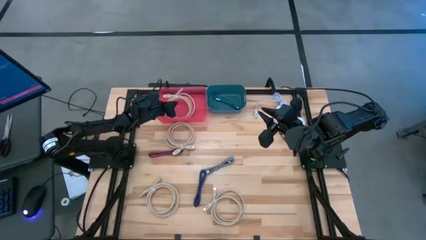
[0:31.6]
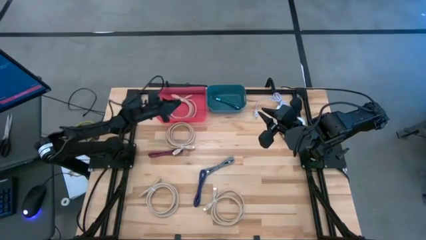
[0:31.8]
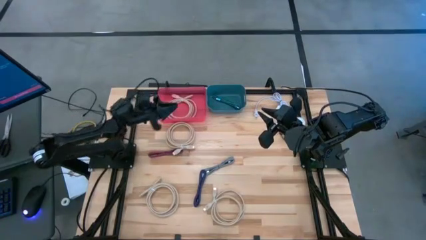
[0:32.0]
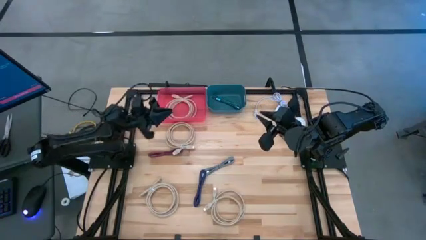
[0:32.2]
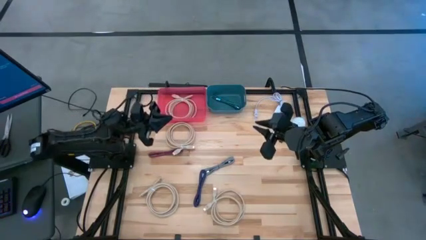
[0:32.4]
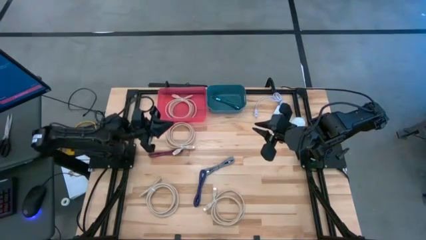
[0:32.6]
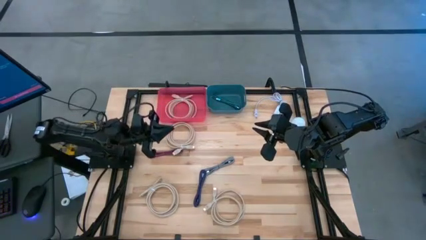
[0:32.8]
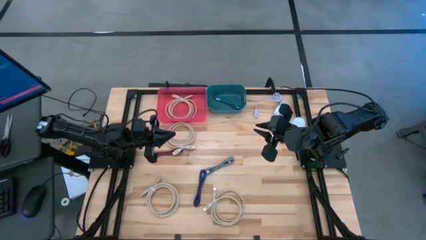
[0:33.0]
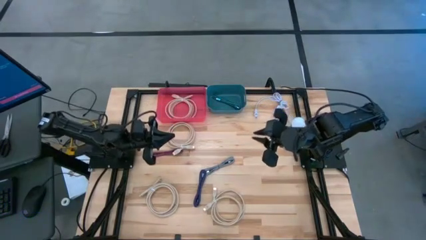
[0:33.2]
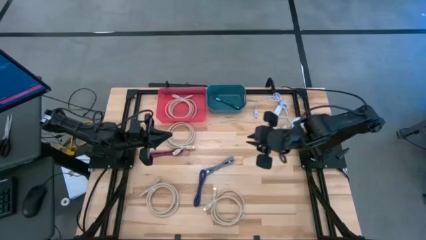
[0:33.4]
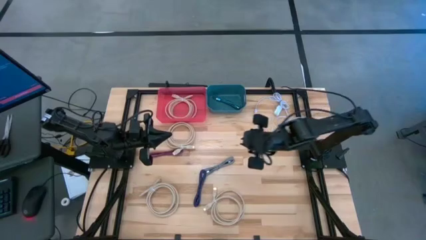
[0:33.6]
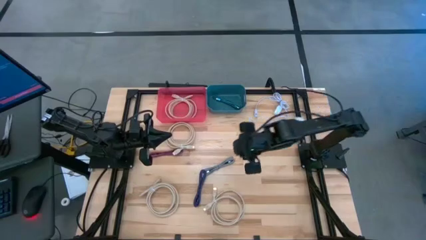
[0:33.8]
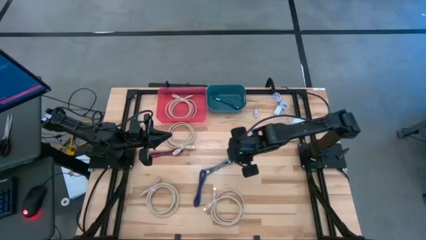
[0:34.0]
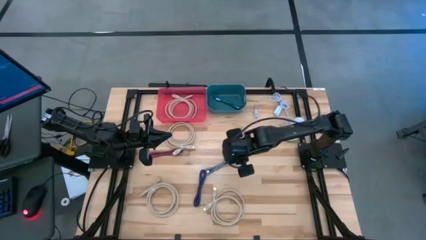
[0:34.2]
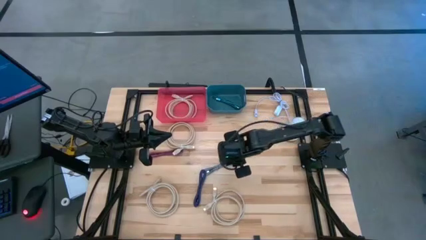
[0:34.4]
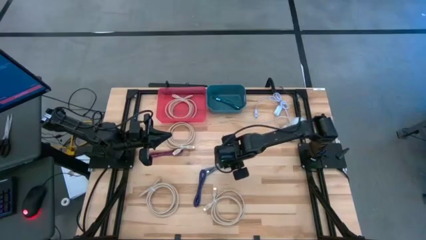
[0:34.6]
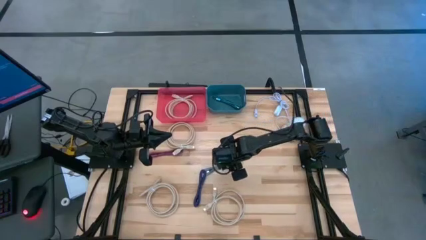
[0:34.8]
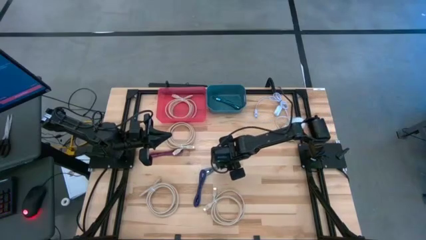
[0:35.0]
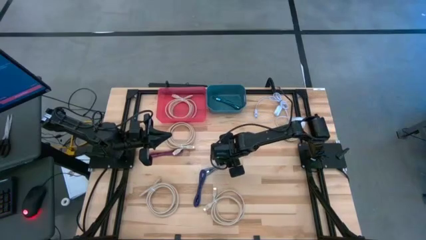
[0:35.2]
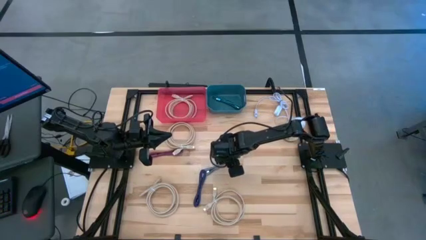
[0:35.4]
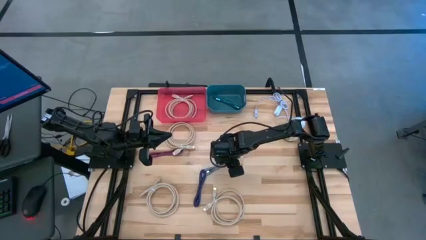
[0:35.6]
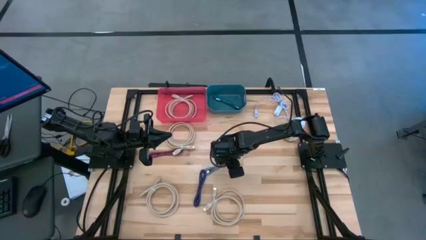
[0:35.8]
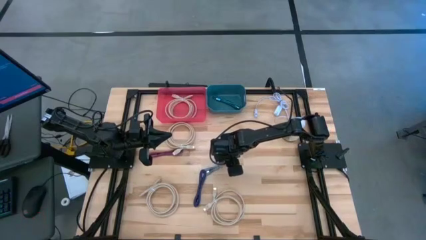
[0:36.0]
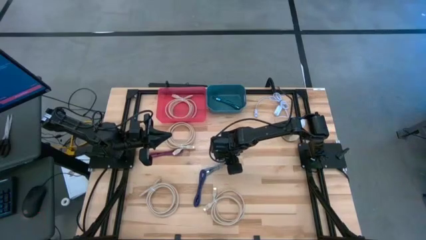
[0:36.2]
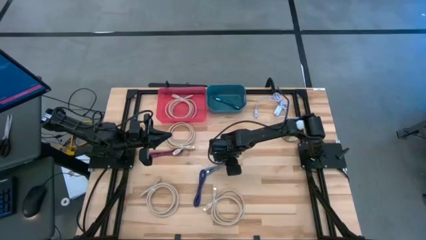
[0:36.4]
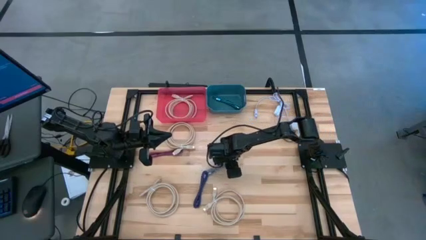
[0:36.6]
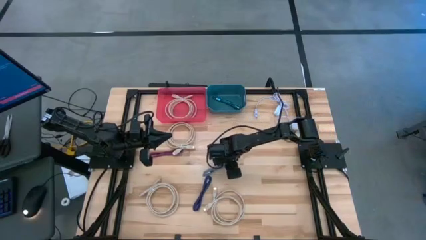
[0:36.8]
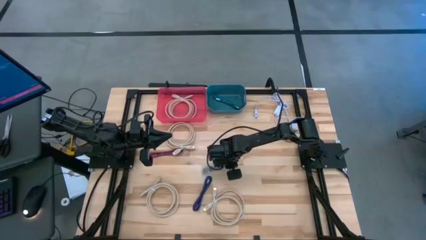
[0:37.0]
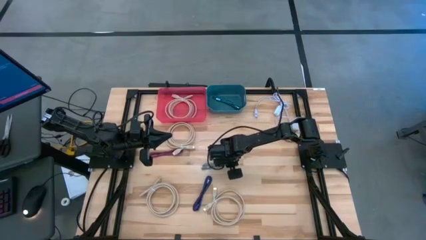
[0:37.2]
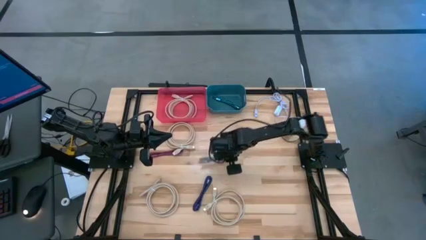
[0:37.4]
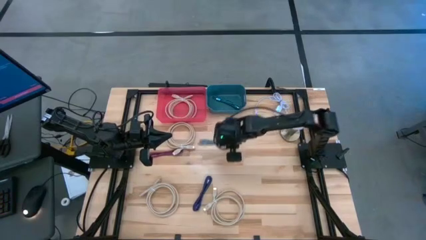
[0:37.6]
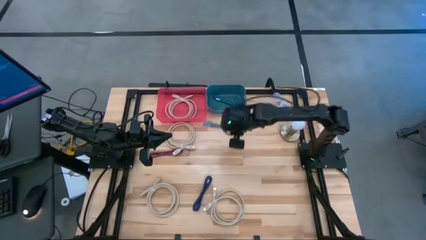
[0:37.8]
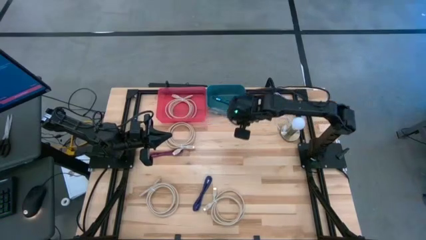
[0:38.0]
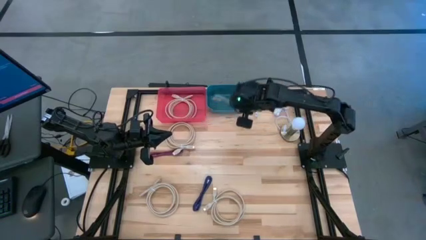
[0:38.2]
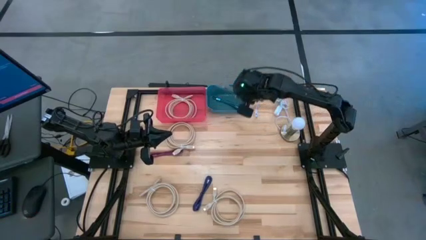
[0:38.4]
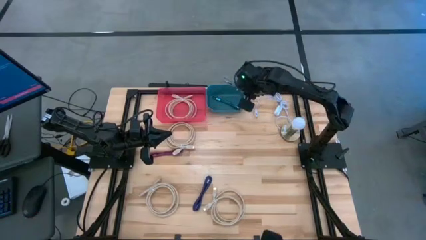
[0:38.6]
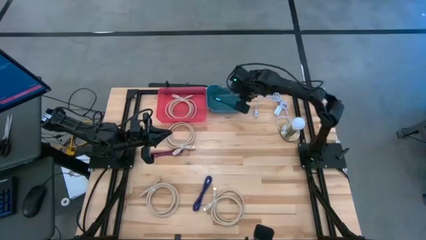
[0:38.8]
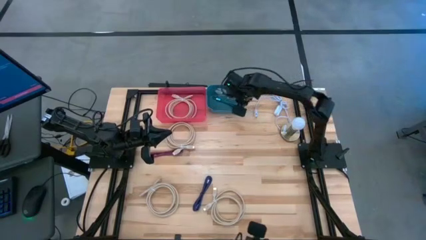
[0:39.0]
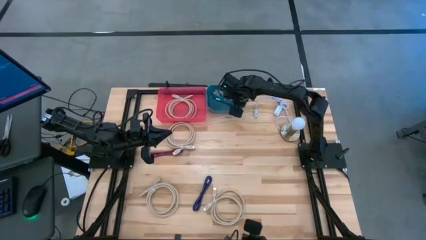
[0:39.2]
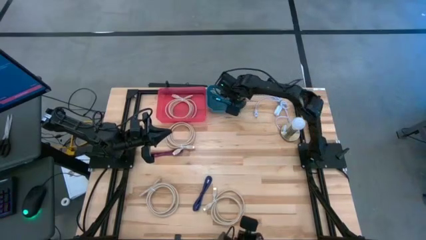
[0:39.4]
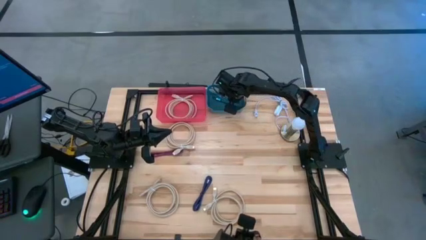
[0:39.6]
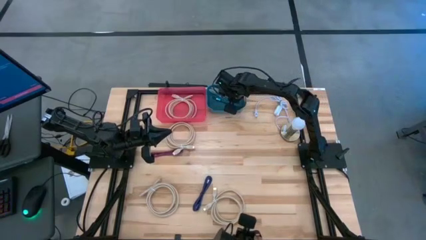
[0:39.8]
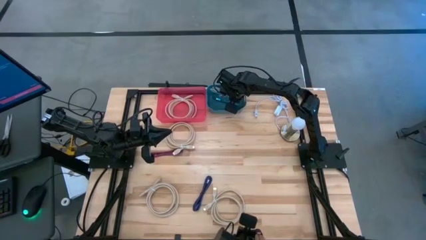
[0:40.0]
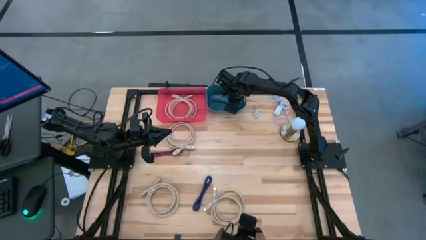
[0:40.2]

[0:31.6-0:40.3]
Task: Pick & Place USB Port
Put the black white charger cable into the blue bin

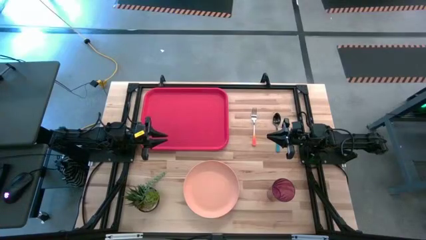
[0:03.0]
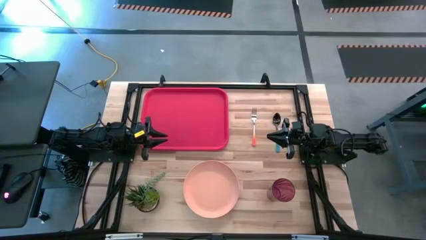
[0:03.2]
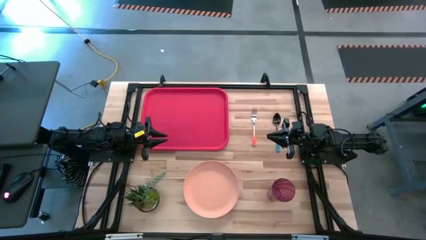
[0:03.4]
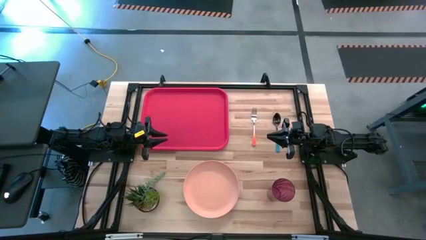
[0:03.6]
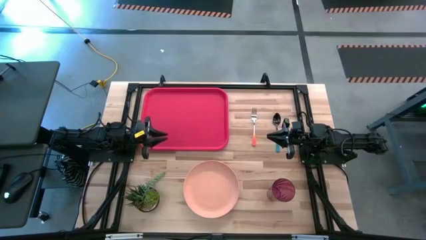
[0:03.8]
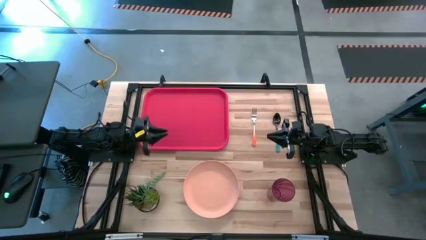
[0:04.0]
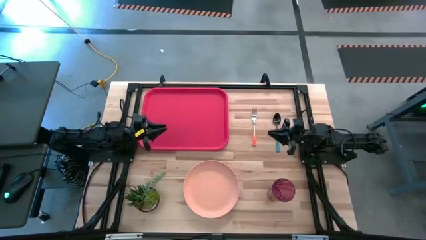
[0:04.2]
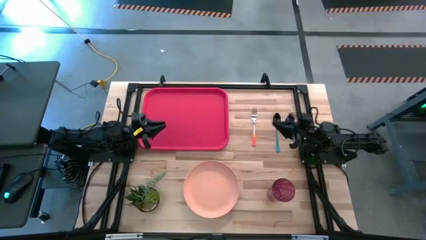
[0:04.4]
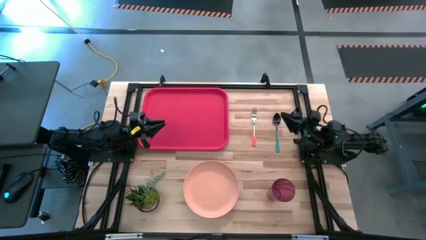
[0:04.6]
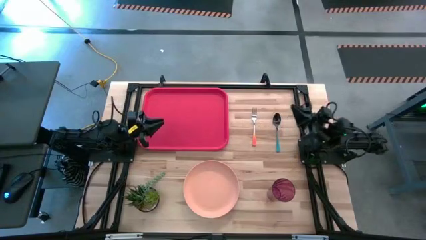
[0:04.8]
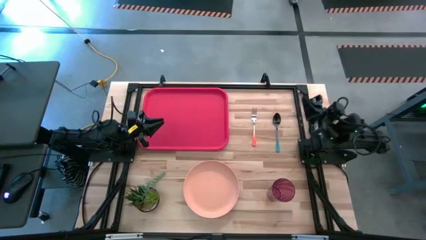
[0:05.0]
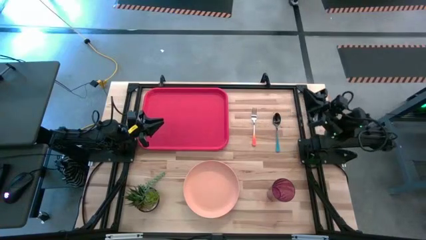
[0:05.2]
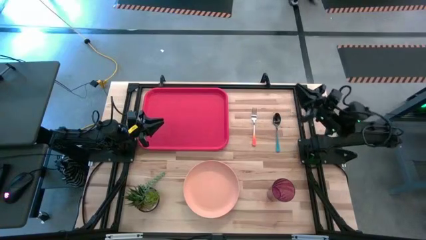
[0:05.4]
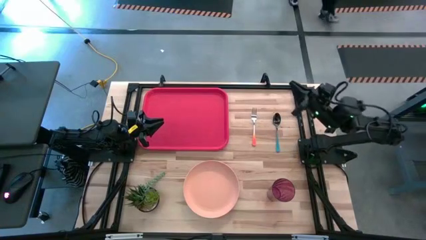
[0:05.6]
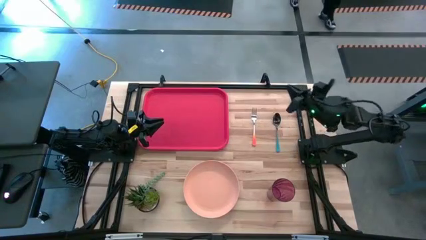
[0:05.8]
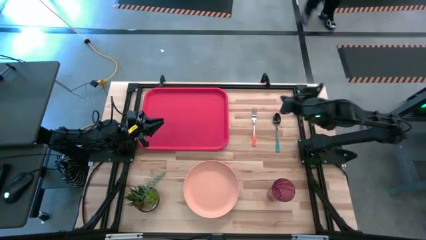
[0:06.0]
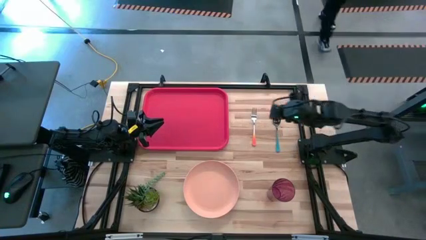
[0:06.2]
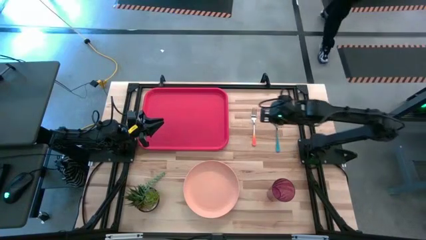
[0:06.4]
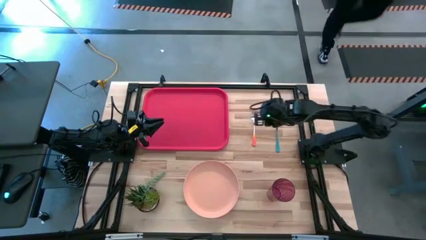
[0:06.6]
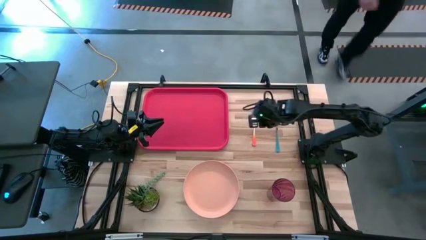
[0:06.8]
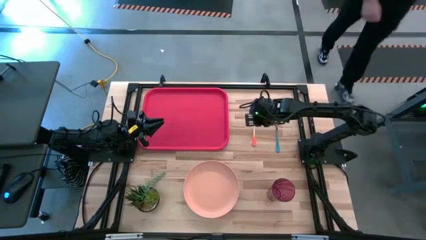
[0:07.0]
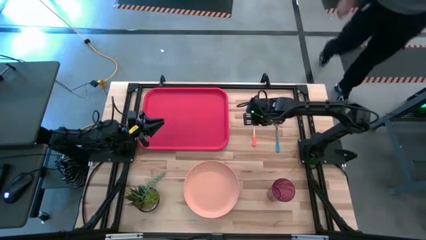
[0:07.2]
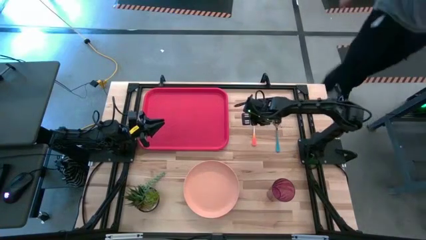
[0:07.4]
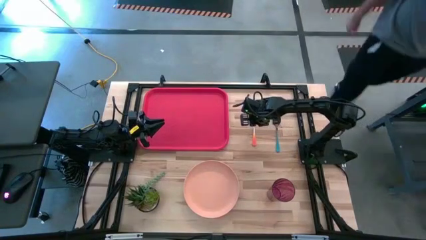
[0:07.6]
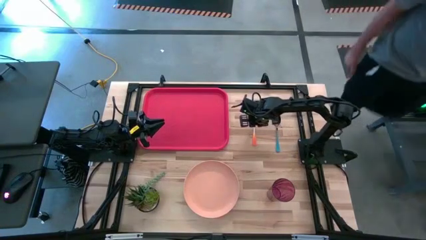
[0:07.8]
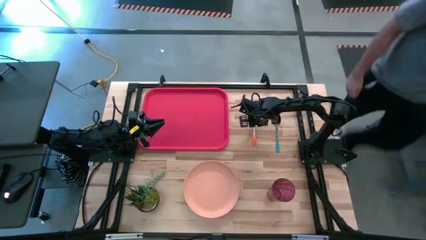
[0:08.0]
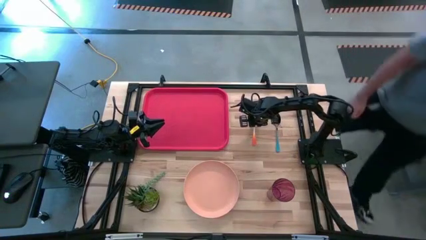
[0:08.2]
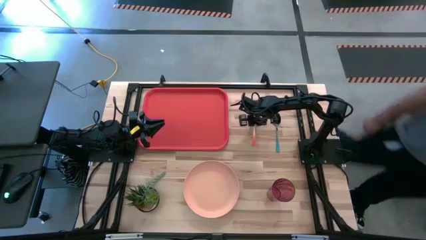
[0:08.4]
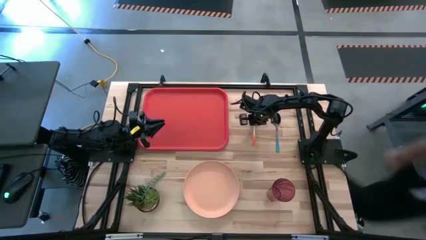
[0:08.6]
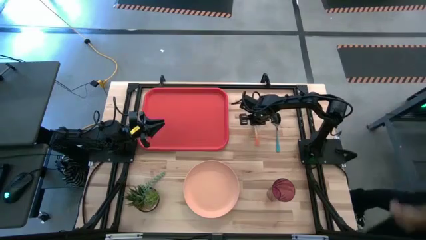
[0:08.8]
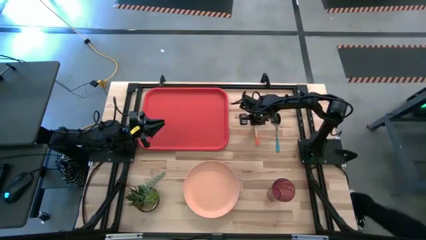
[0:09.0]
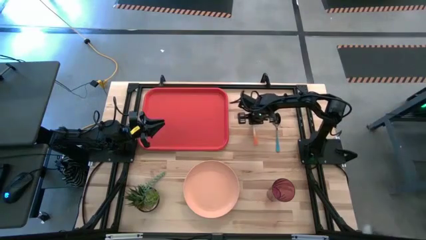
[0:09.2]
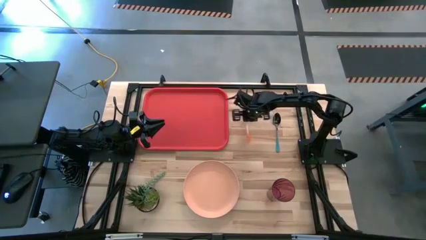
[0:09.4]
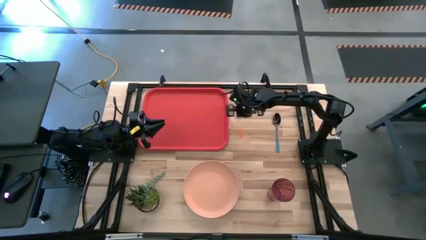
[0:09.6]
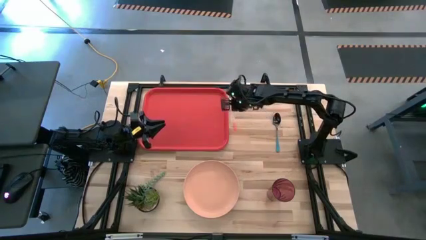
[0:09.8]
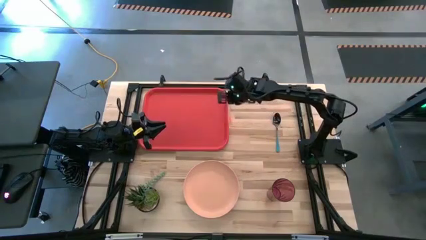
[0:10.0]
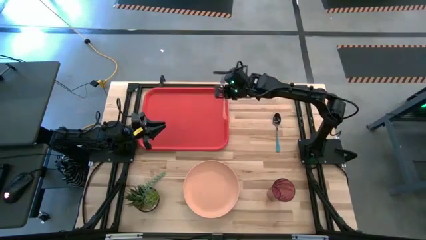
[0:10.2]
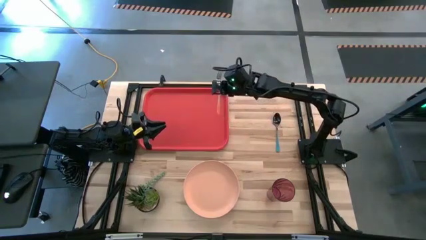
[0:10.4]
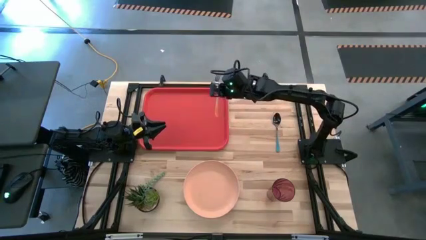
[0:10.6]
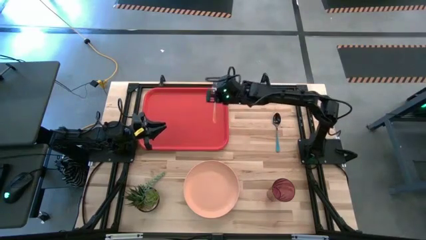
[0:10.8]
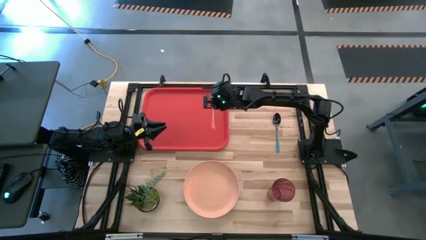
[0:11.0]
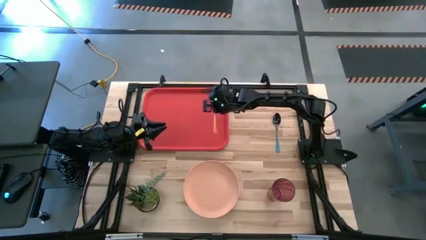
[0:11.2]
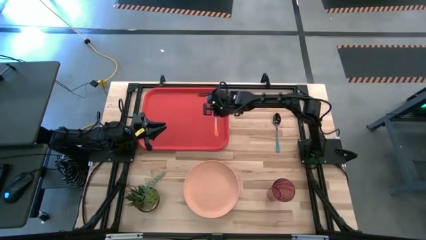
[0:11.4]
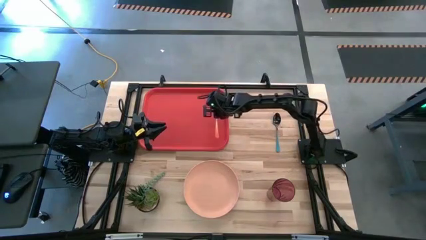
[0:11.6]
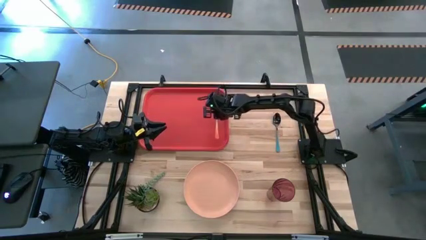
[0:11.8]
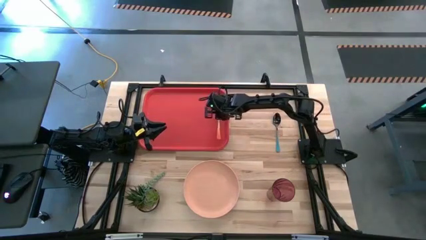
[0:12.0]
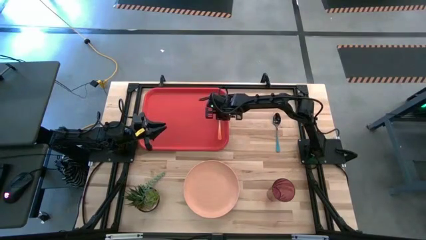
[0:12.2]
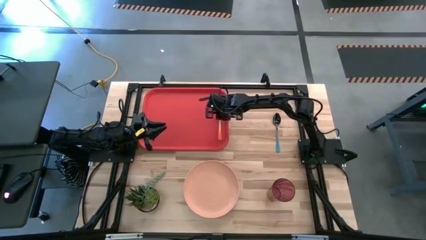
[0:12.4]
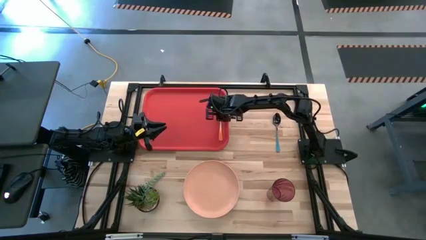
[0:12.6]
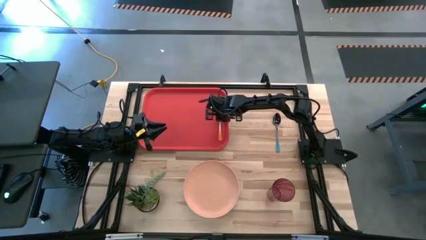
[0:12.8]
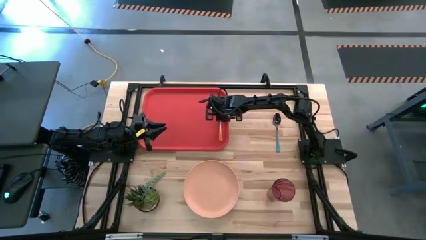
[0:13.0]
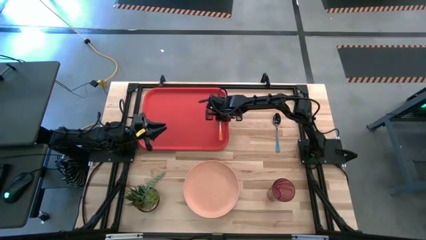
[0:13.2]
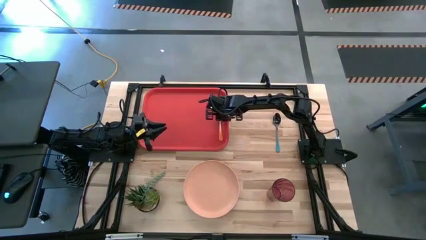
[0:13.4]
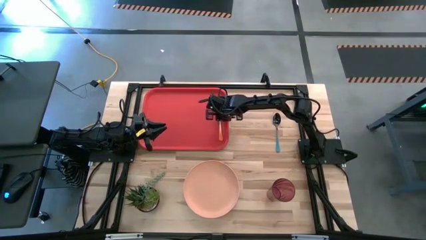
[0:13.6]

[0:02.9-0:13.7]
Task: Pick and place plate/cup/fork/spoon on tray
Put the orange fork on the red serving tray
